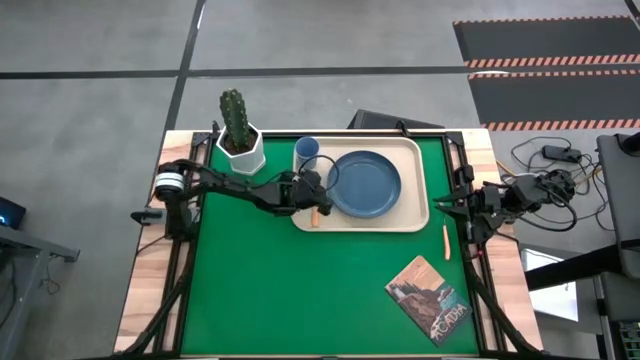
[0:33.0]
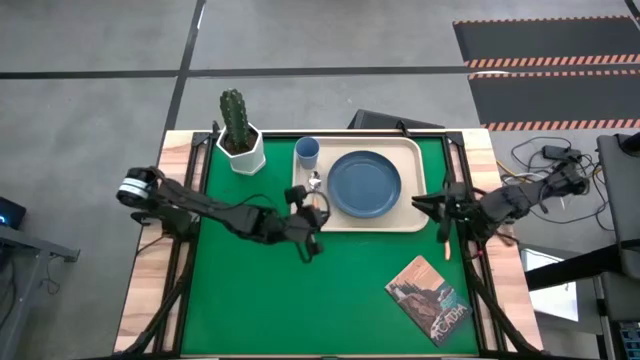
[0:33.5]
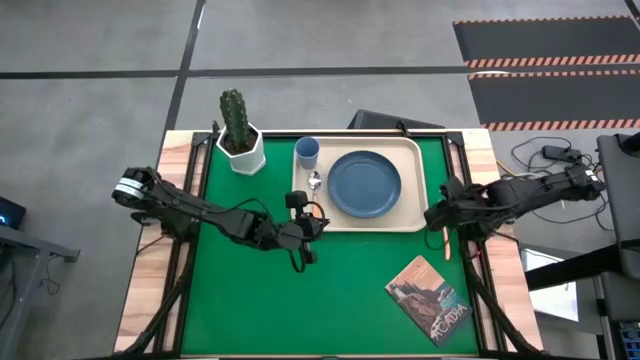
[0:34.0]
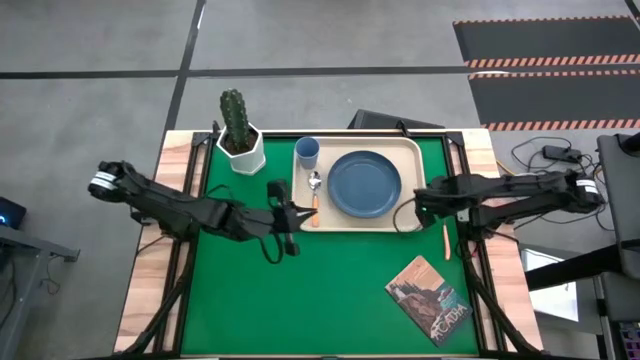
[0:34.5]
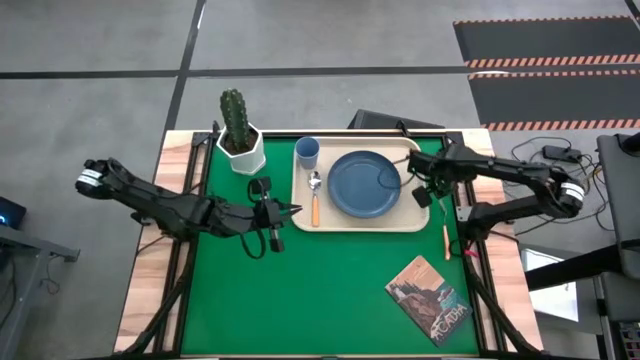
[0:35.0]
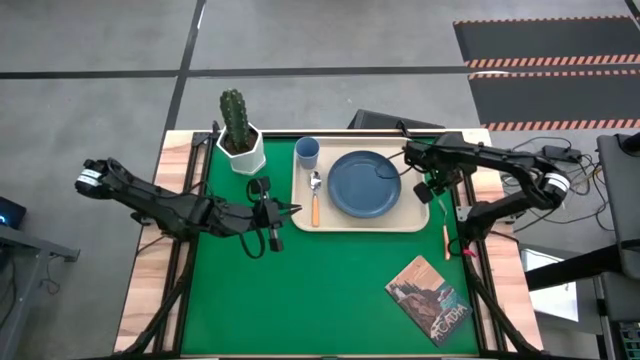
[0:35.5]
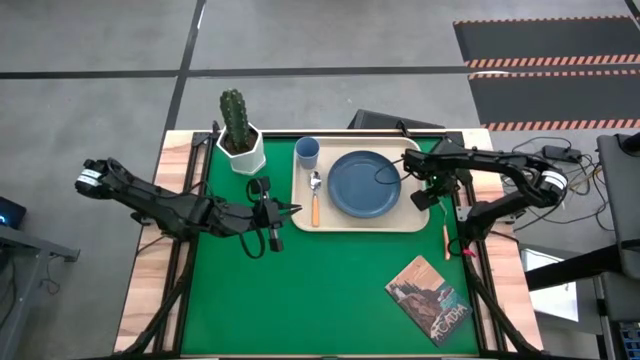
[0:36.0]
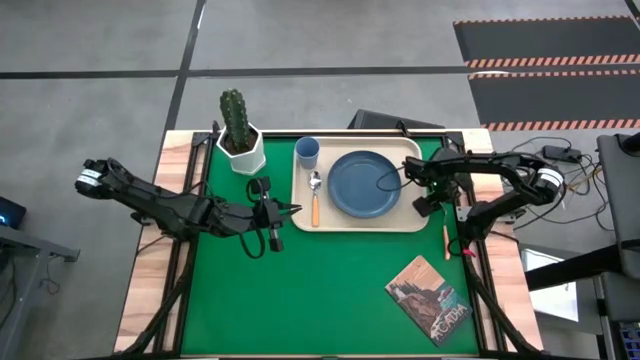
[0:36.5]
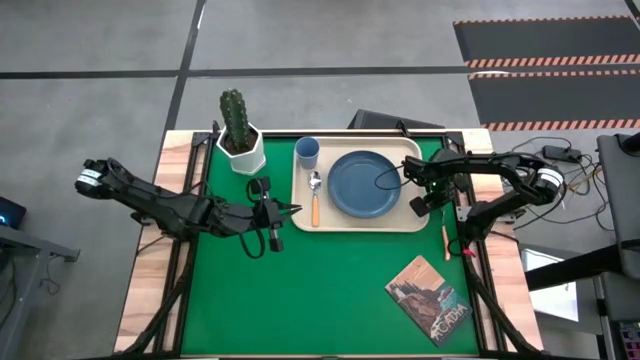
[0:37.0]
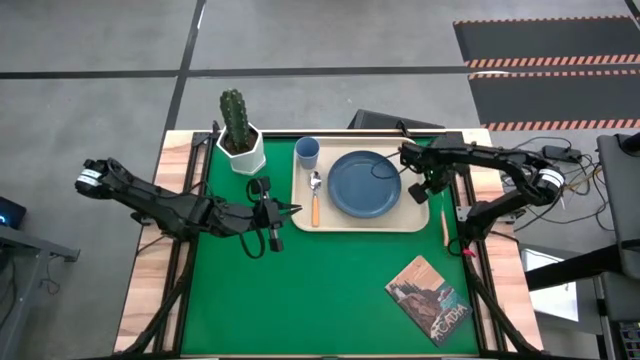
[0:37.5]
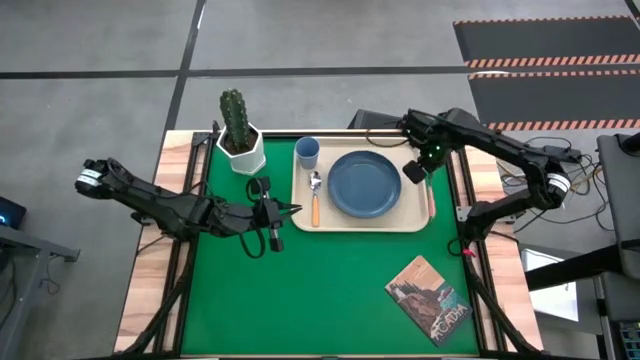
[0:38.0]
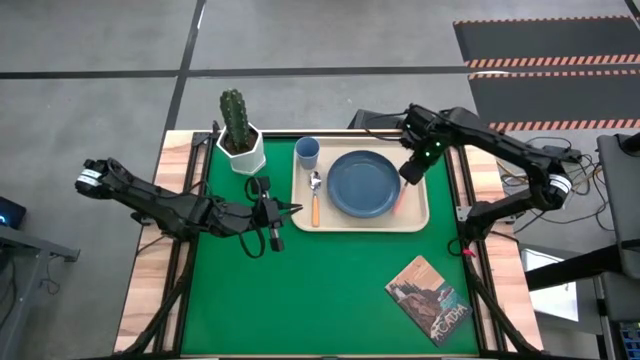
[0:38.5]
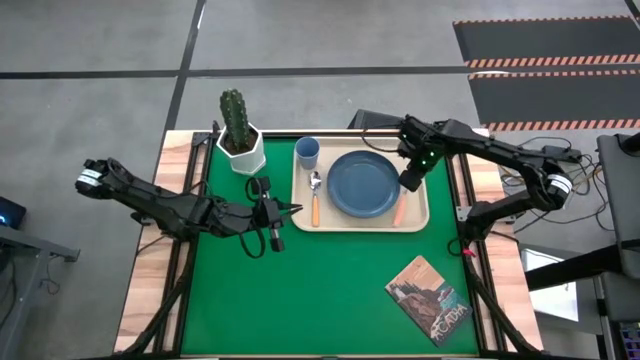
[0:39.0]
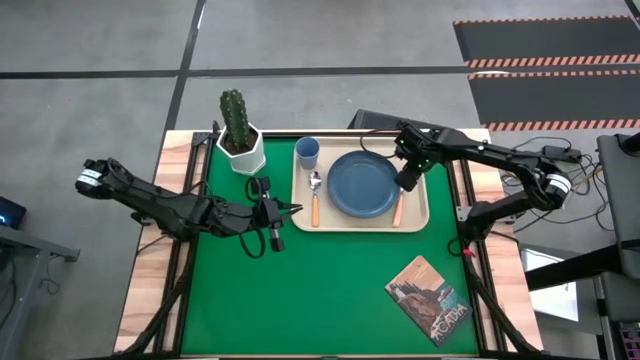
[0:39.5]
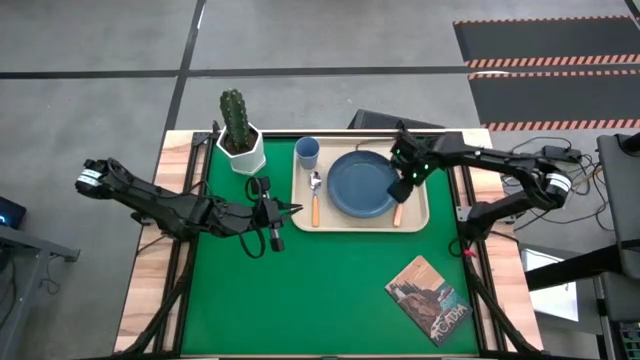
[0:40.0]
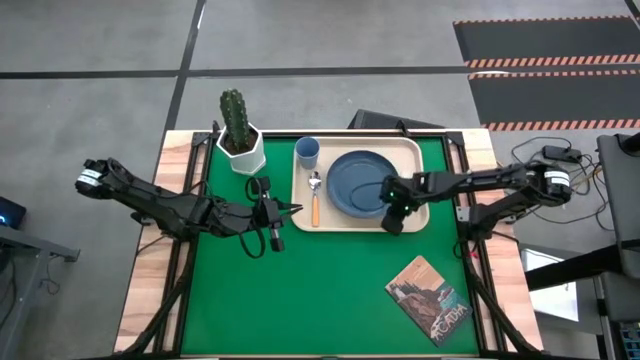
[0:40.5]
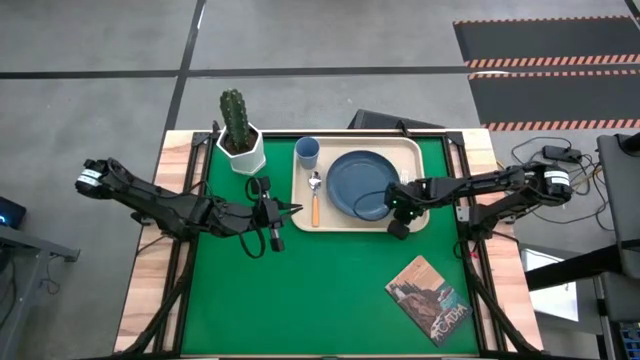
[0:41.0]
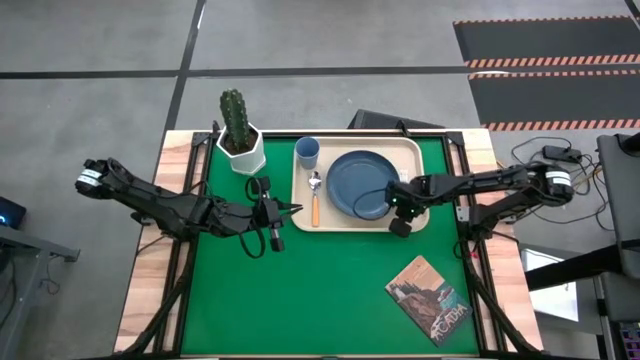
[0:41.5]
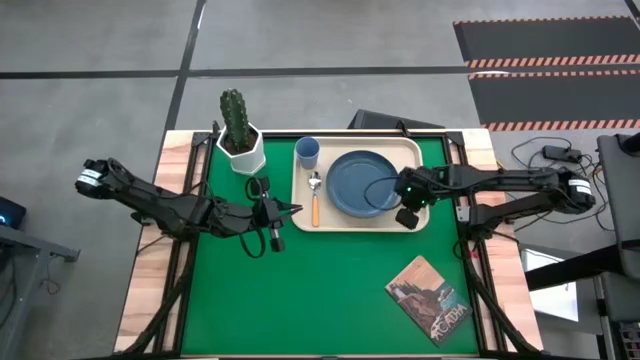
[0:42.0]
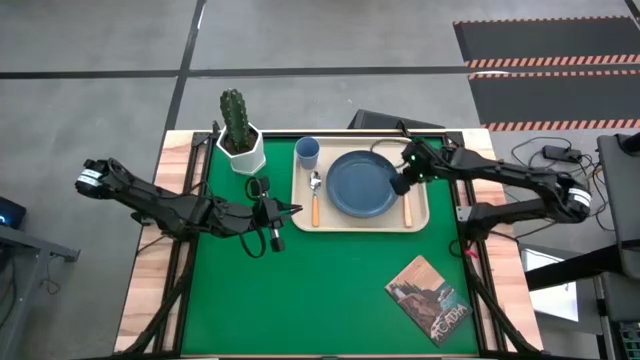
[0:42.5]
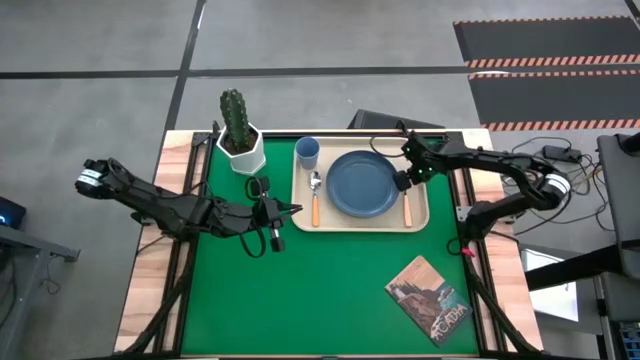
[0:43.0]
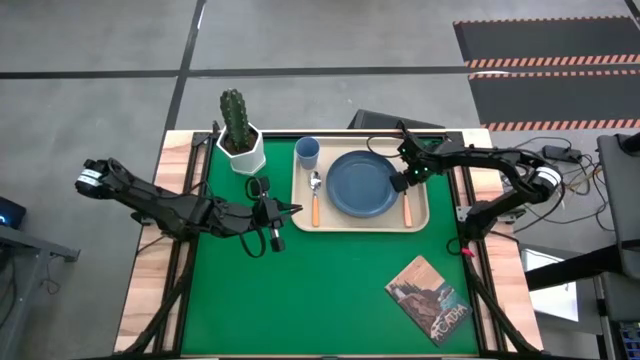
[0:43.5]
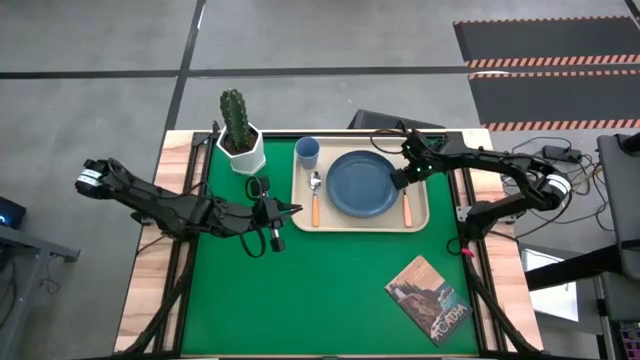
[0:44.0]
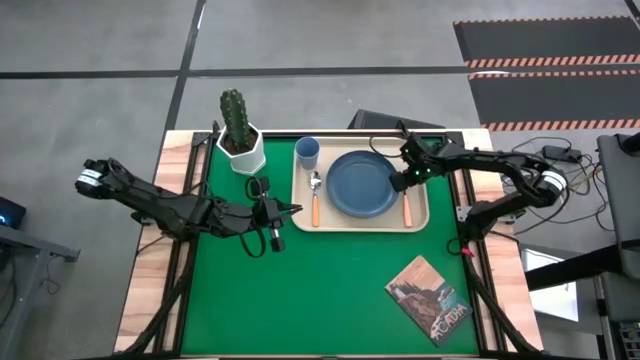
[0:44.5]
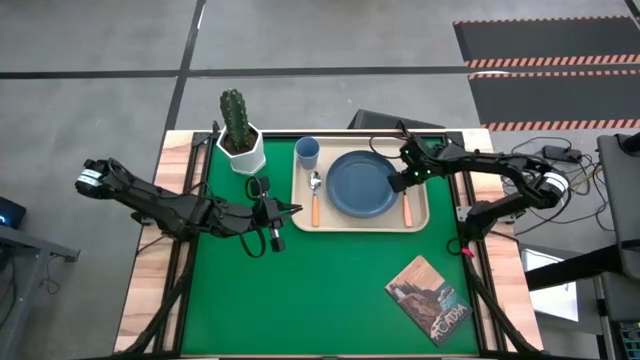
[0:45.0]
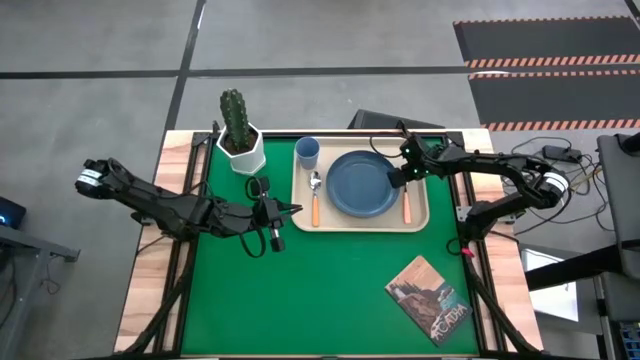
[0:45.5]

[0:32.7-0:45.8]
Task: Pick and place plate/cup/fork/spoon on tray
Put the orange fork on the white serving tray to the right of the blue plate

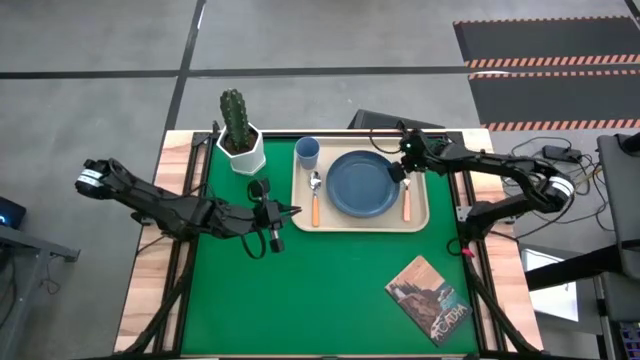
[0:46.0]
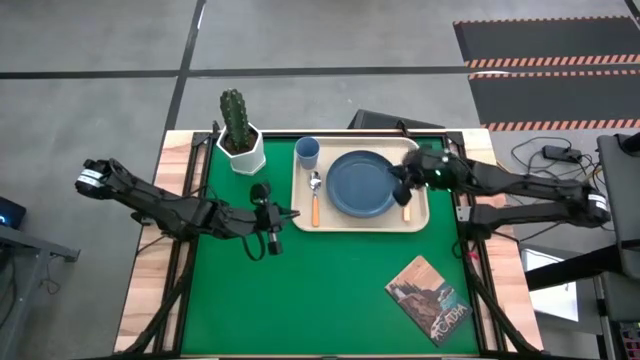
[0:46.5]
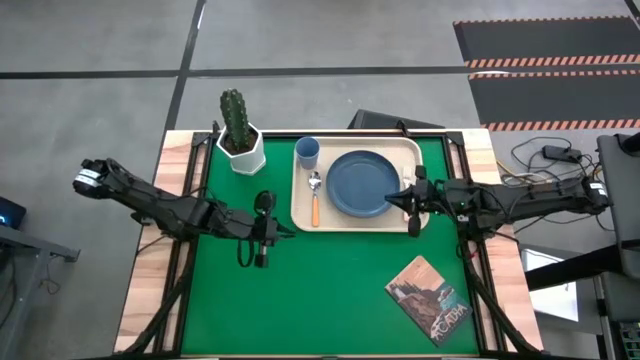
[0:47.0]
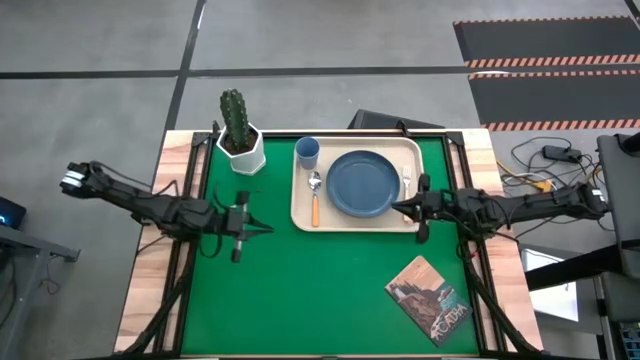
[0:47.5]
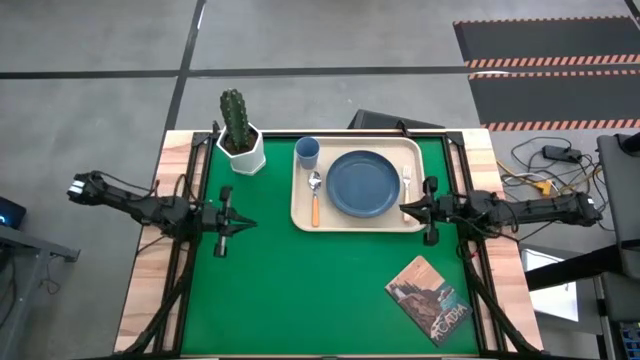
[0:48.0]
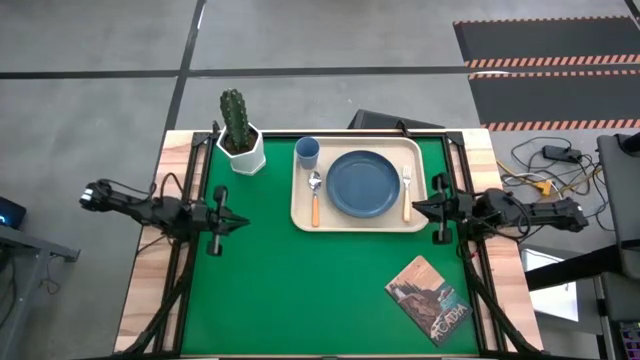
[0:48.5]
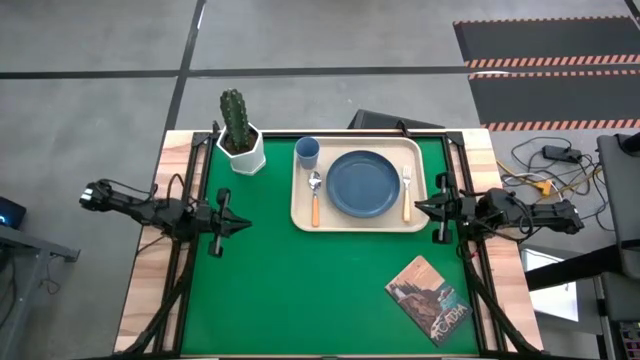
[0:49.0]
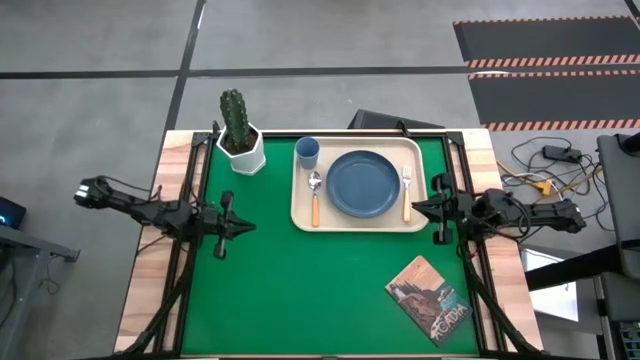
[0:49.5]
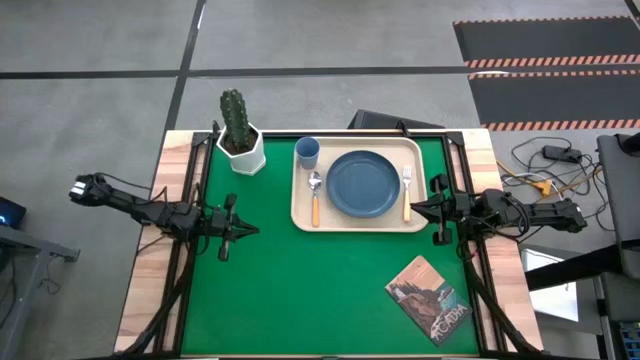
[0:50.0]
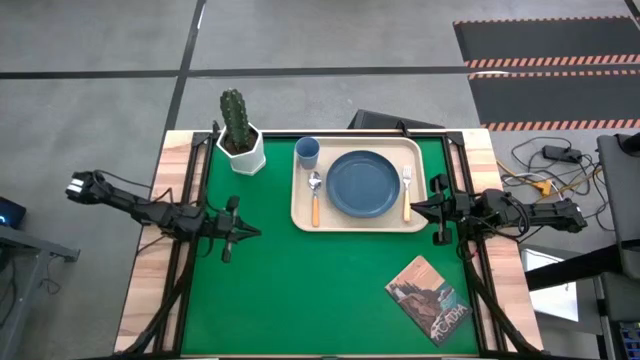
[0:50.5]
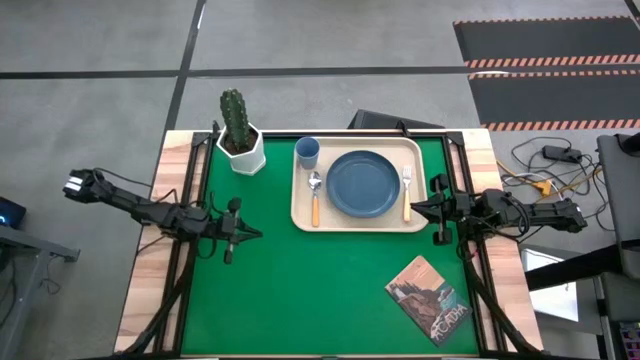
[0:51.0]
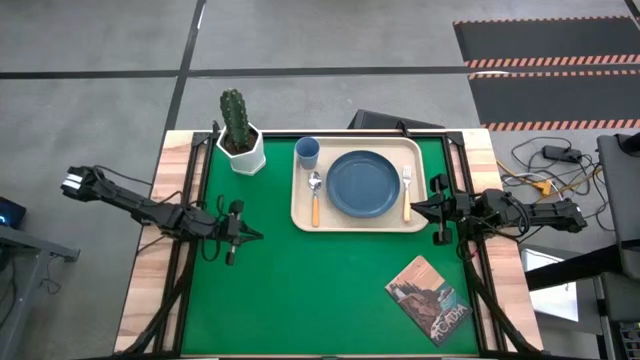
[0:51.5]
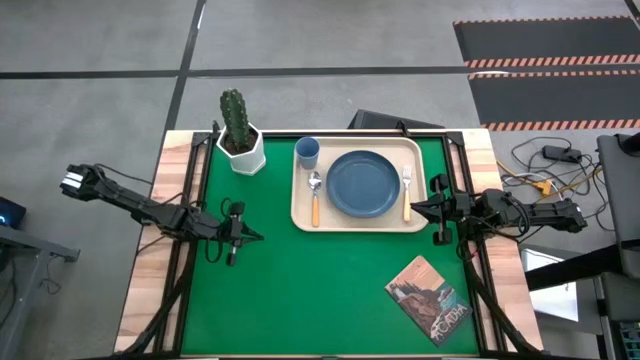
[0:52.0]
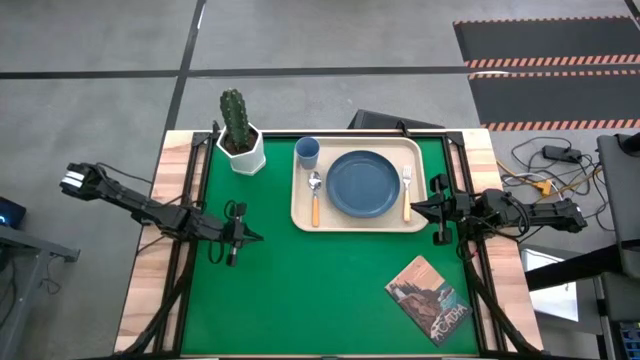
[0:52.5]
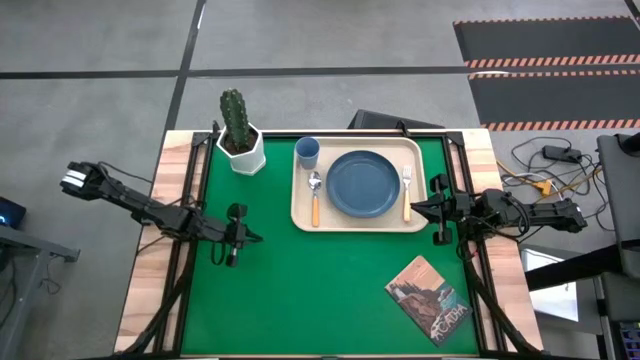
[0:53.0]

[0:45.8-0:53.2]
Return to Home Position
